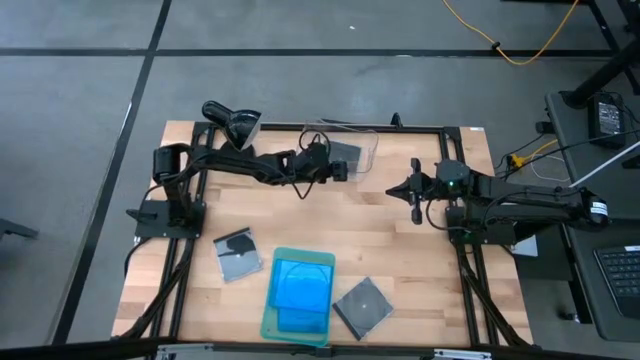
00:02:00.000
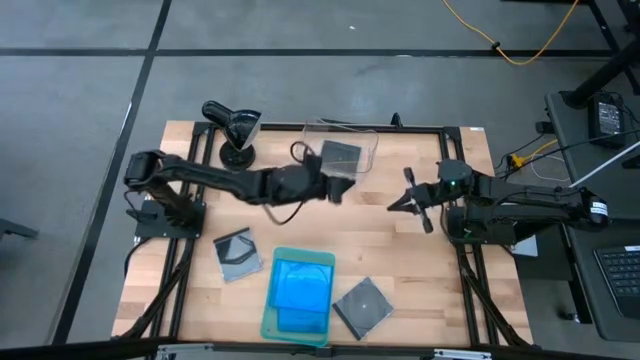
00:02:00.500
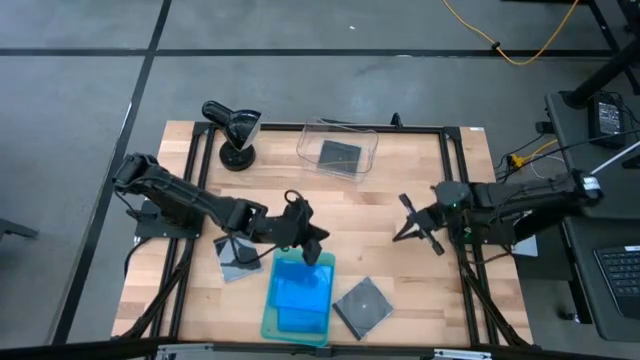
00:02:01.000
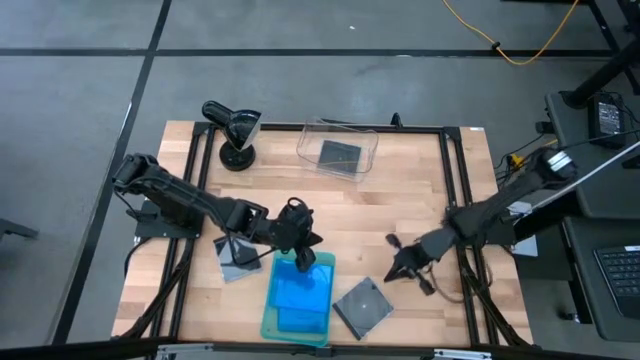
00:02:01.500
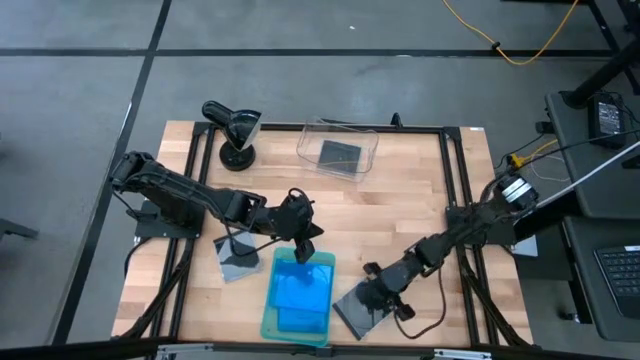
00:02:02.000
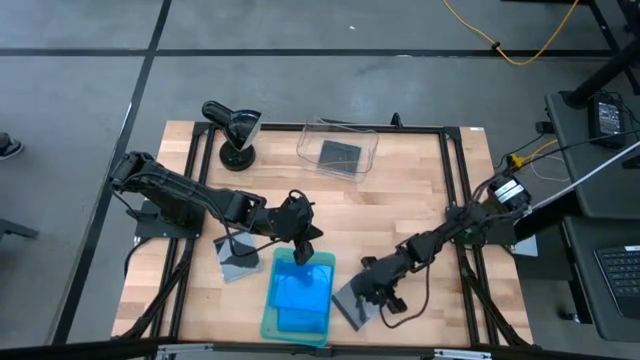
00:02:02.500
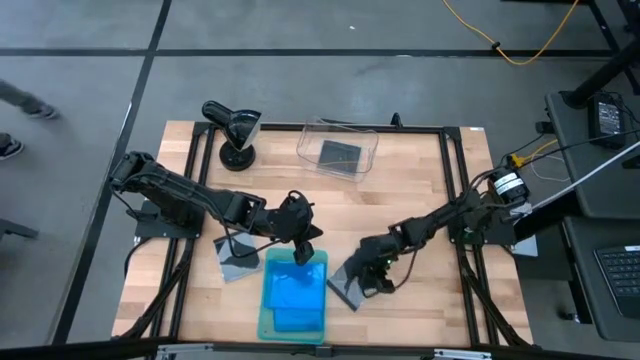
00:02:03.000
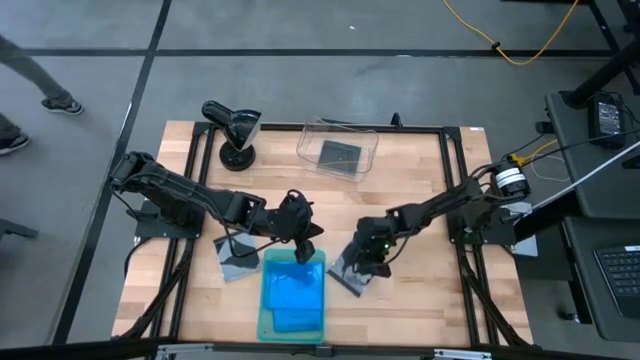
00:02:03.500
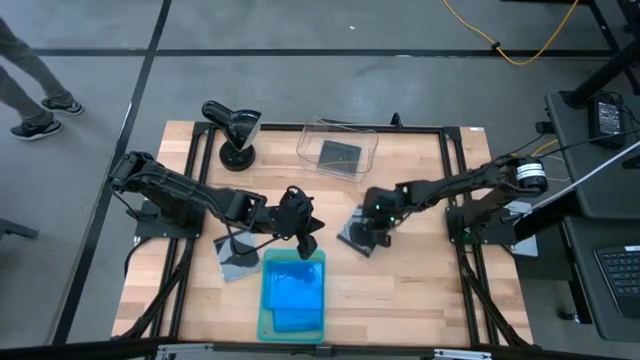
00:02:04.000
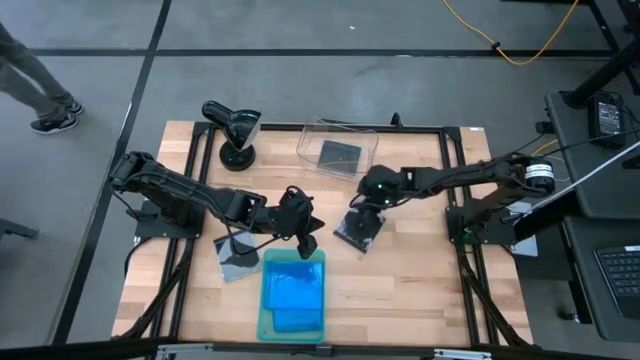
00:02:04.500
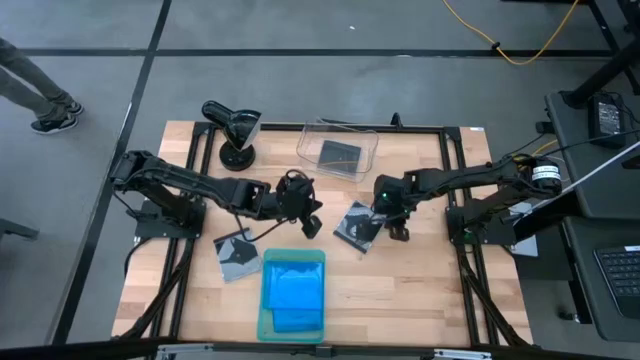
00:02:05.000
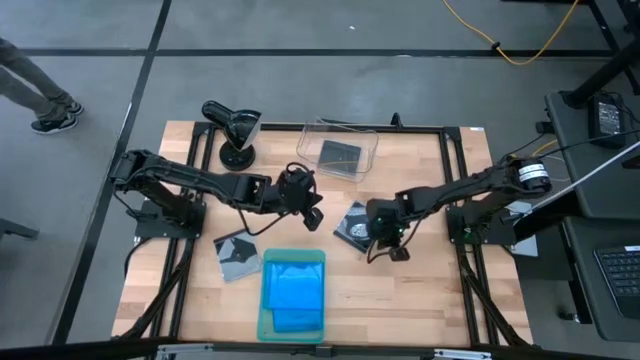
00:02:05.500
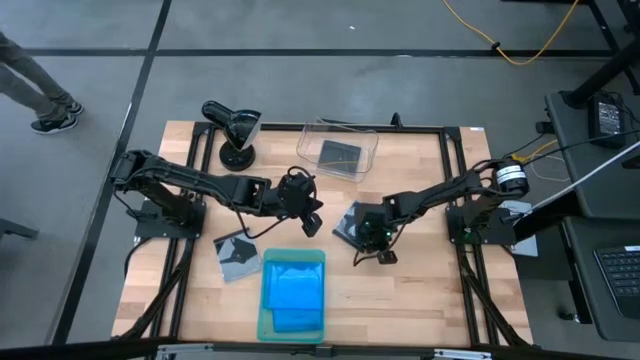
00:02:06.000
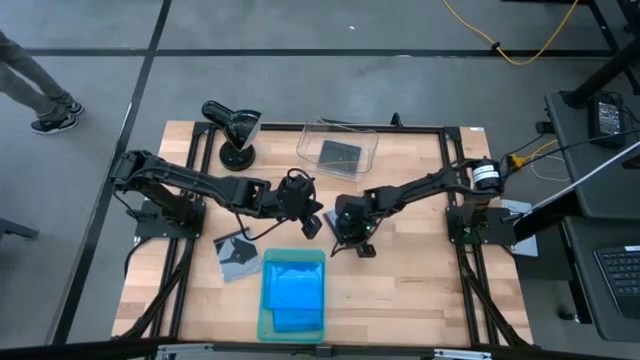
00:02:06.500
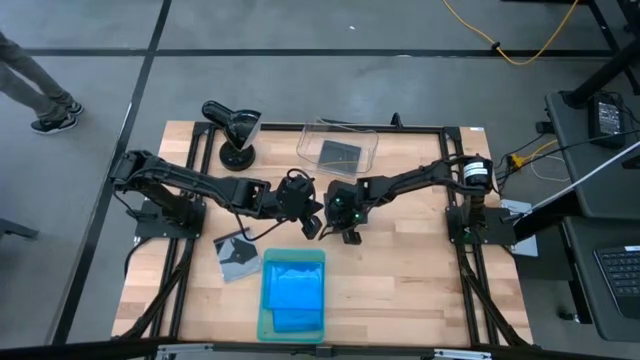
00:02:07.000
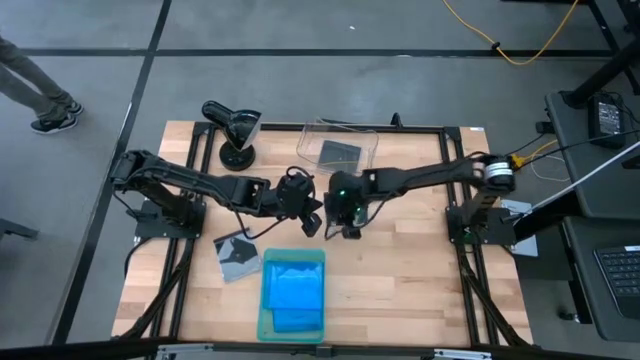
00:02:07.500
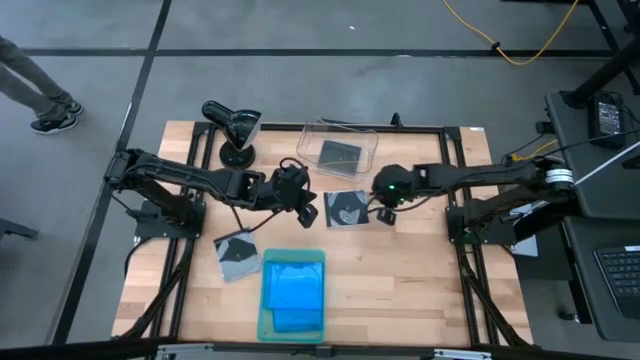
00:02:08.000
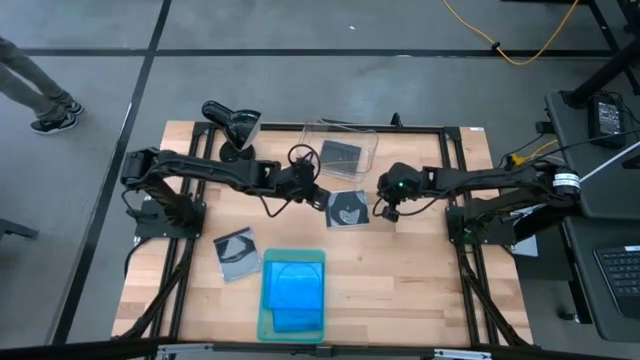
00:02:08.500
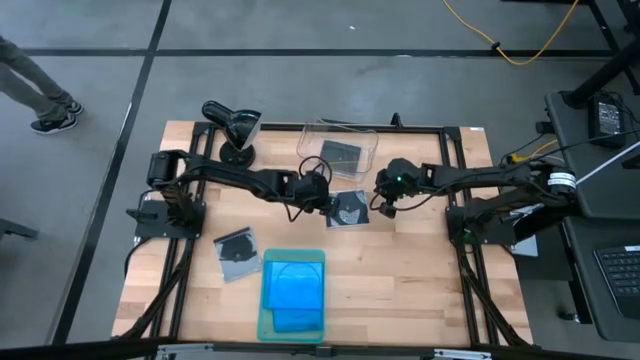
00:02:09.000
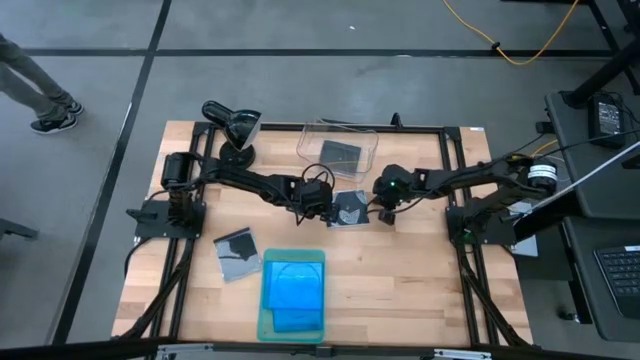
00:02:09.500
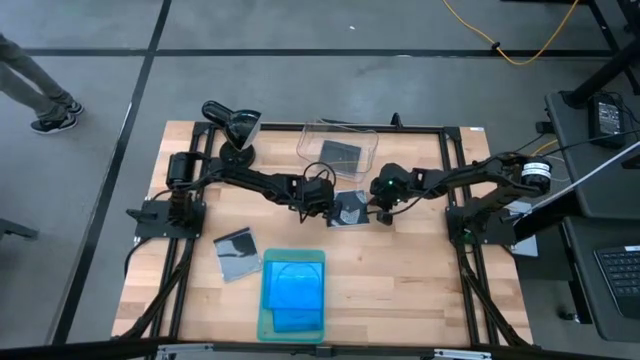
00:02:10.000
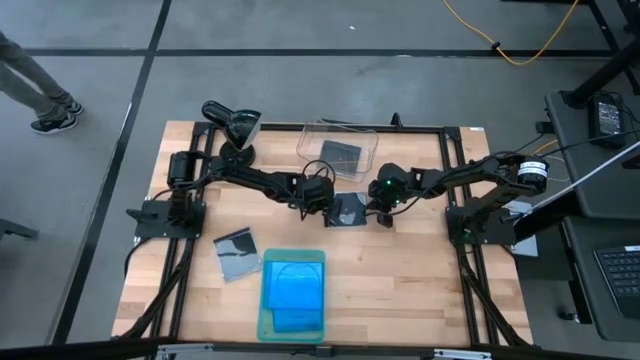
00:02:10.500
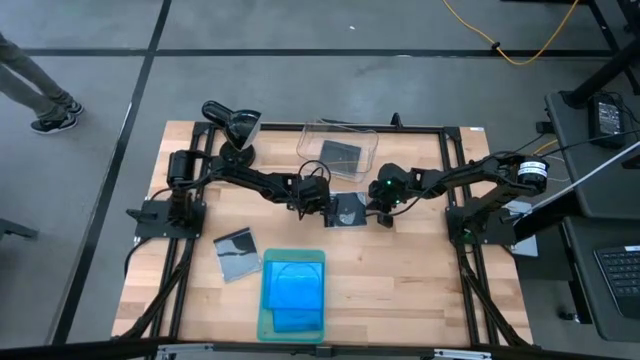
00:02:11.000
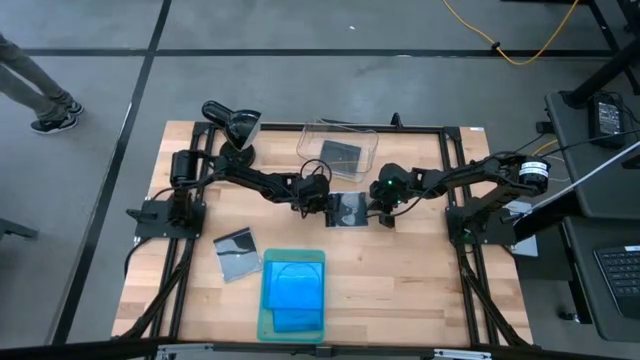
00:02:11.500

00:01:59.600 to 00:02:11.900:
Task: Pick & place jewel cases by type
Put the right black cd case into the transparent bin

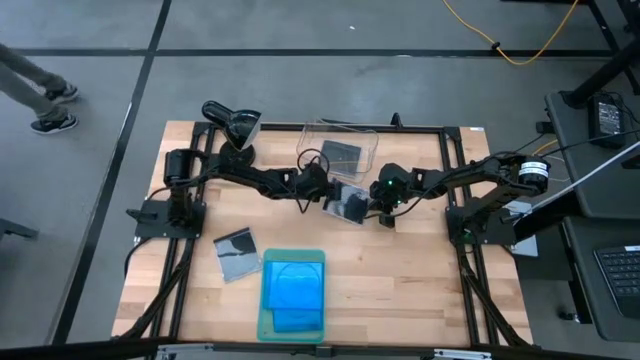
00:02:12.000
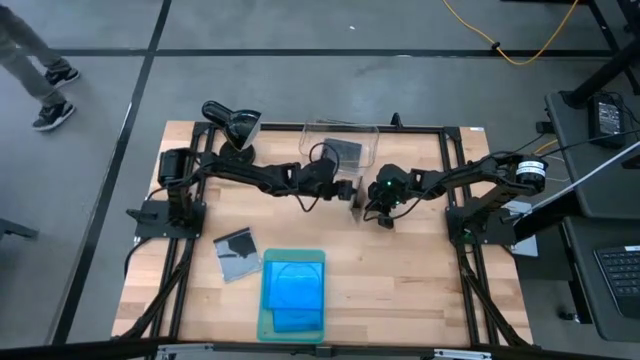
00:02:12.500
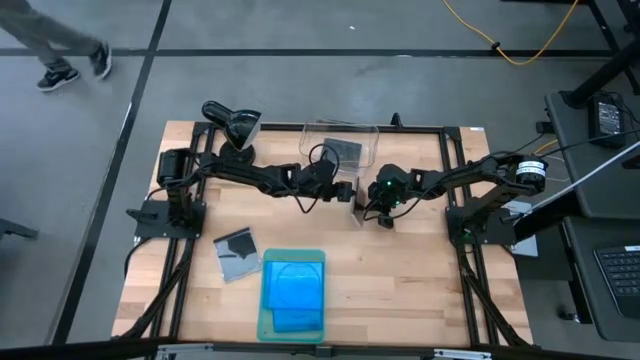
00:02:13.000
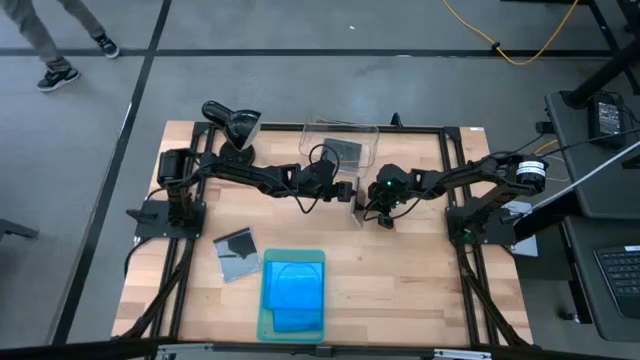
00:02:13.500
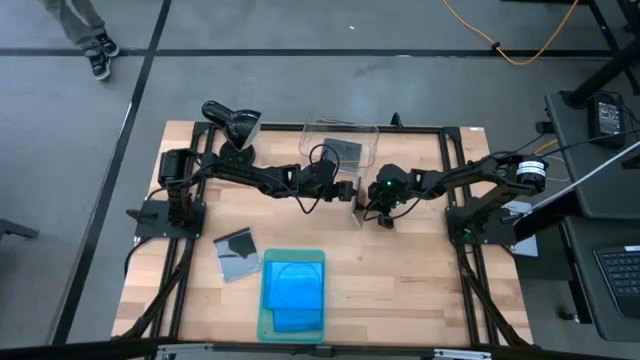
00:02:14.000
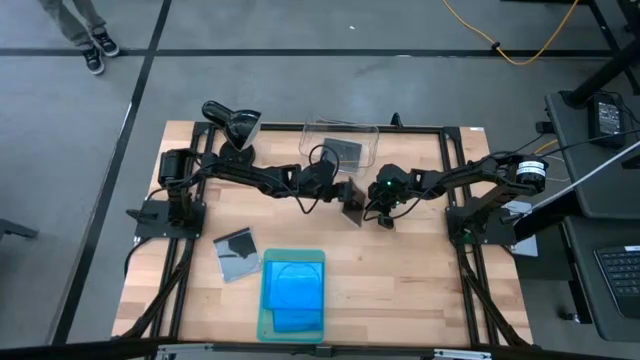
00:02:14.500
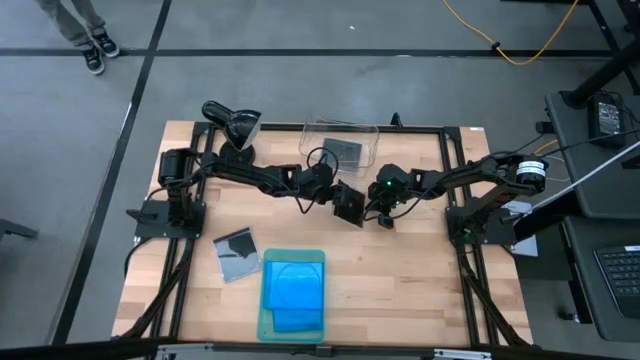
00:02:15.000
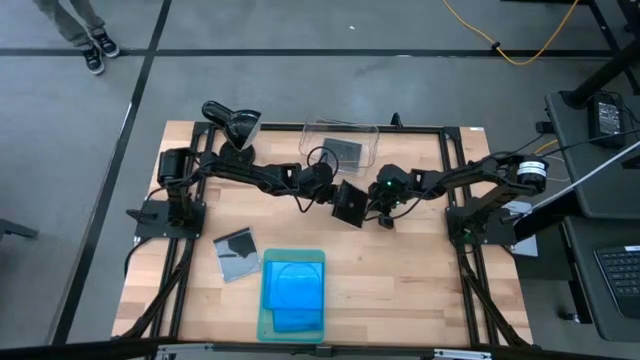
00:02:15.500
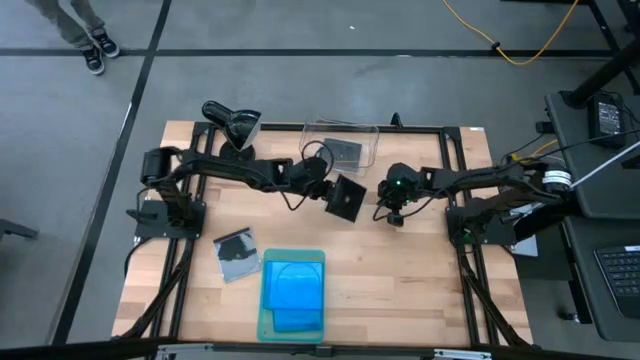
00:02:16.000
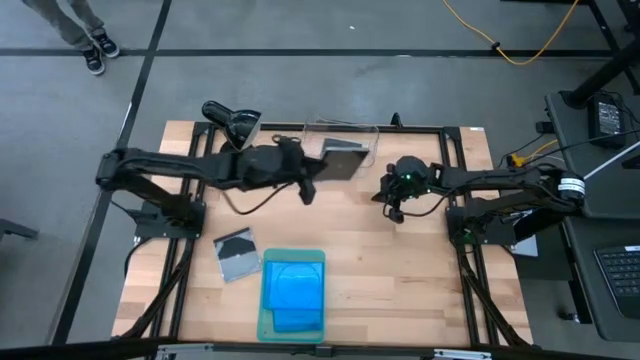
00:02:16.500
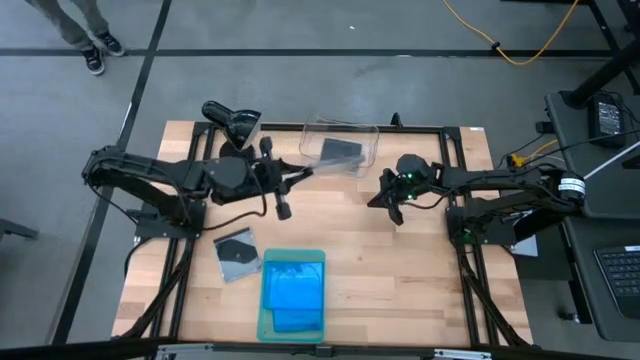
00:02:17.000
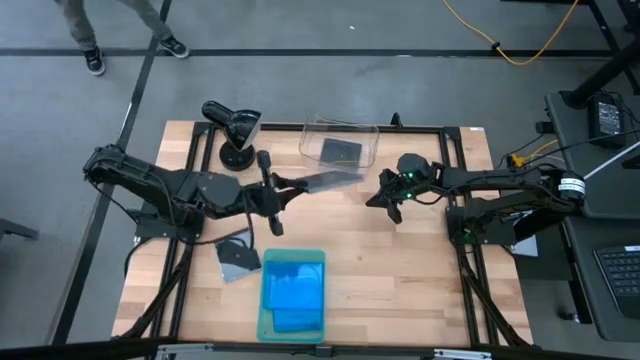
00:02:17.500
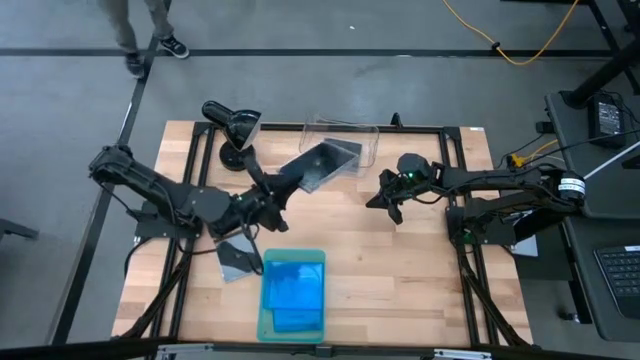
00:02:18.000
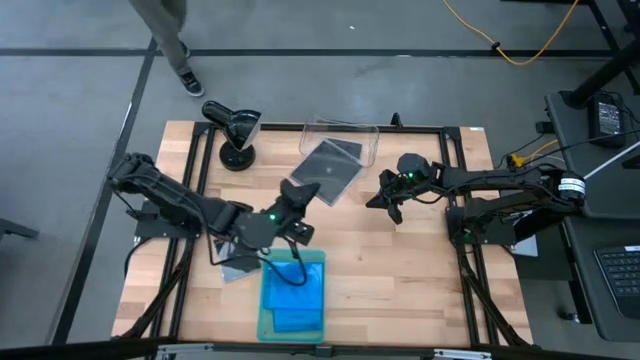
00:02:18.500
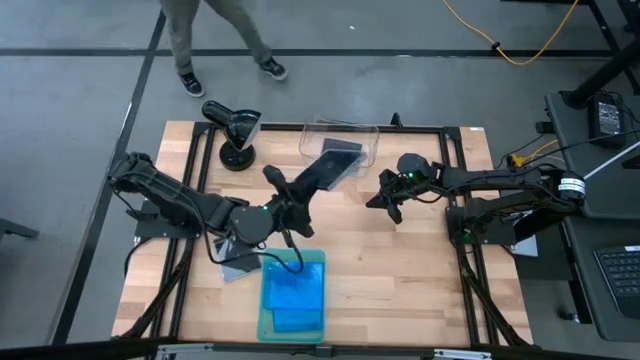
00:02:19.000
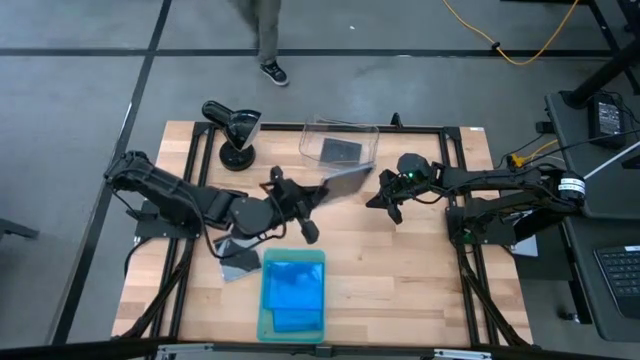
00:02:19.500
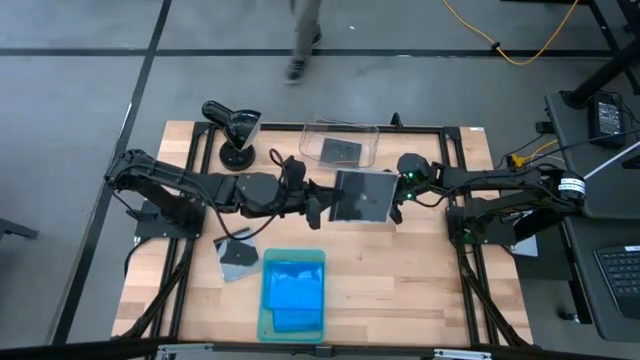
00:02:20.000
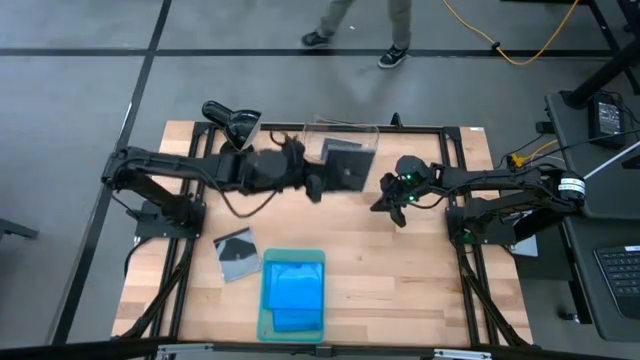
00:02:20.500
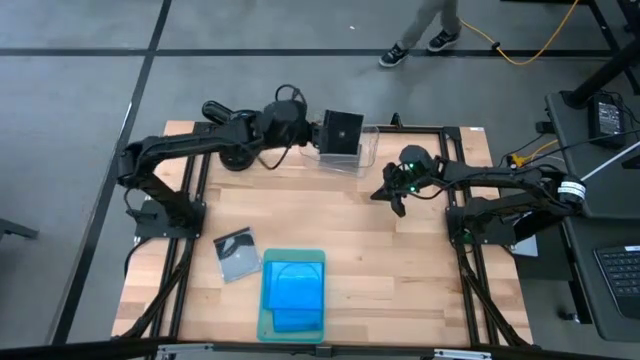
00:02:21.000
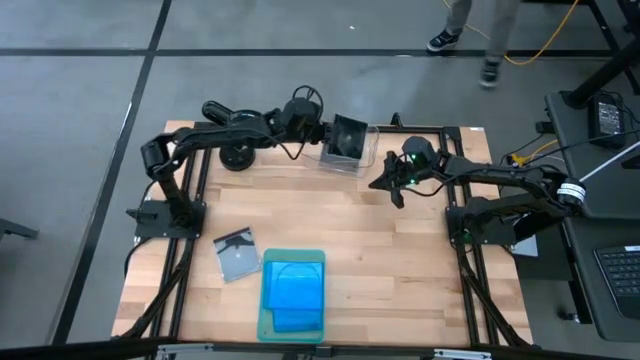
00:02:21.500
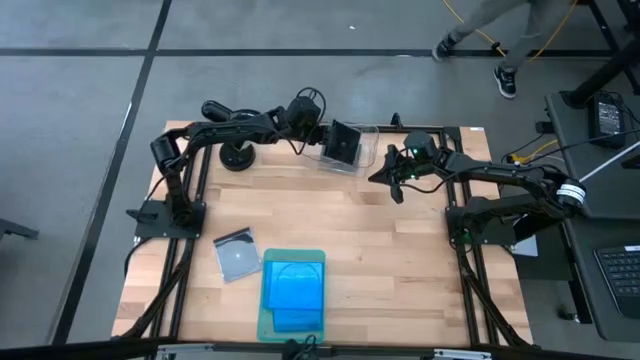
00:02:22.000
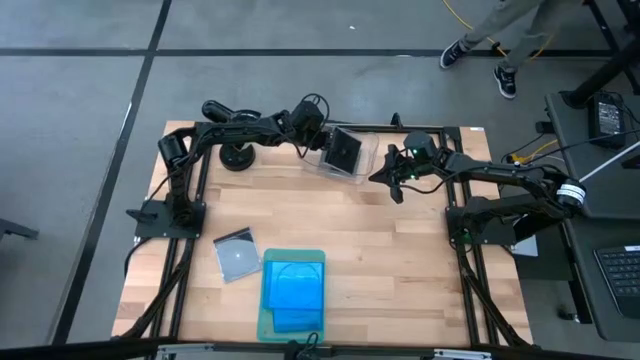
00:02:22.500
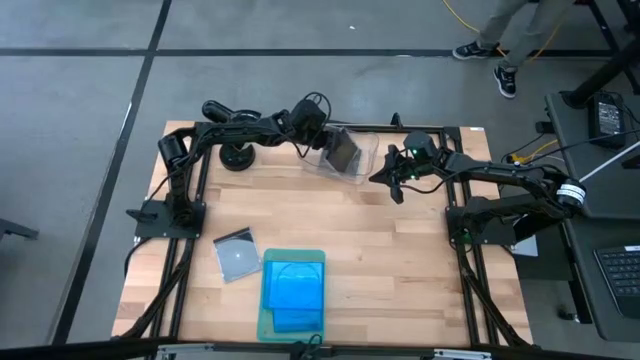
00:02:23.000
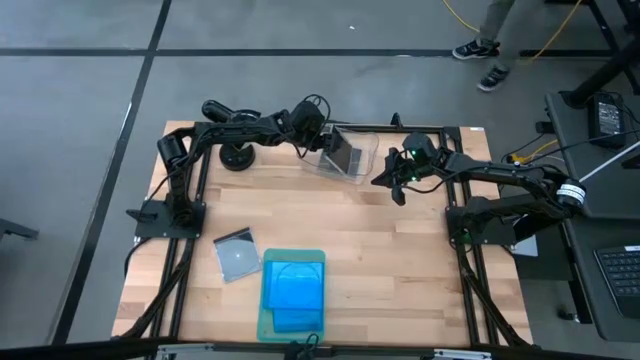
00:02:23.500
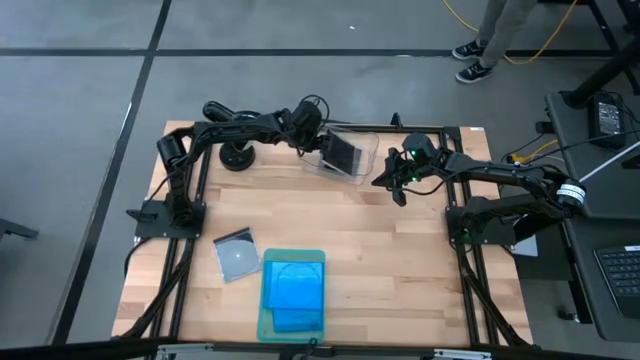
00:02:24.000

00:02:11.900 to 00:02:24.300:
Put the right black cd case into the transparent bin
